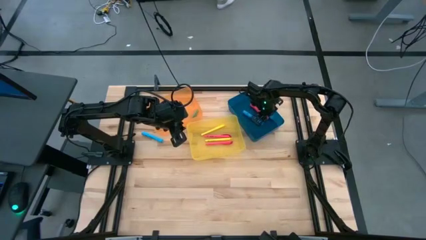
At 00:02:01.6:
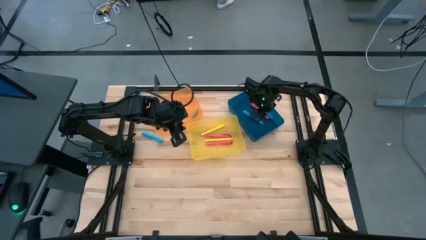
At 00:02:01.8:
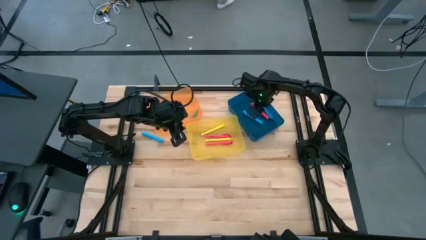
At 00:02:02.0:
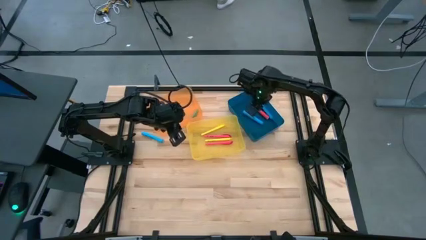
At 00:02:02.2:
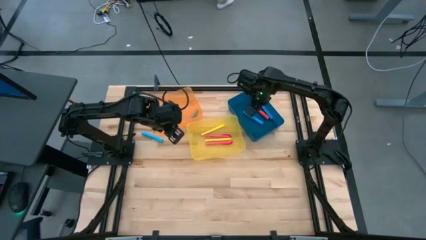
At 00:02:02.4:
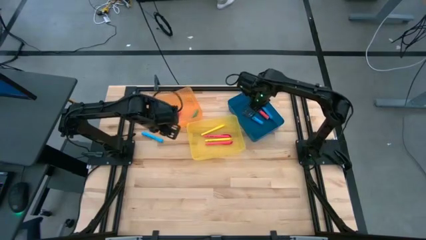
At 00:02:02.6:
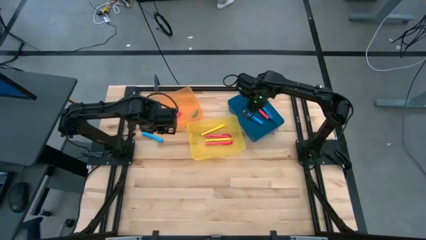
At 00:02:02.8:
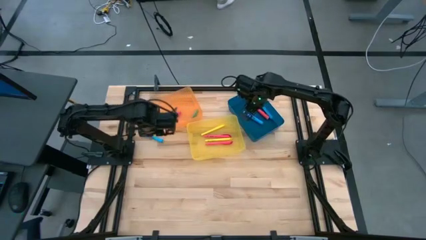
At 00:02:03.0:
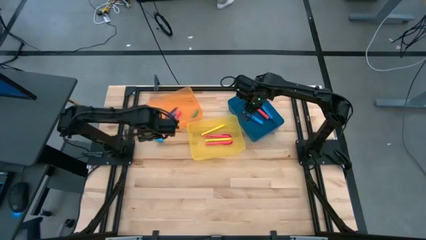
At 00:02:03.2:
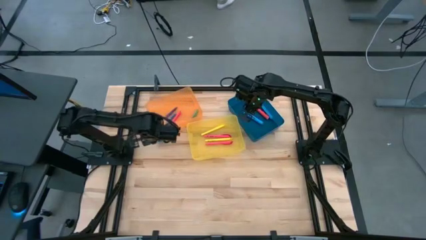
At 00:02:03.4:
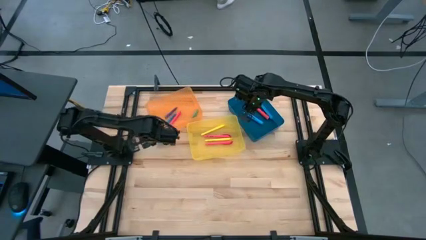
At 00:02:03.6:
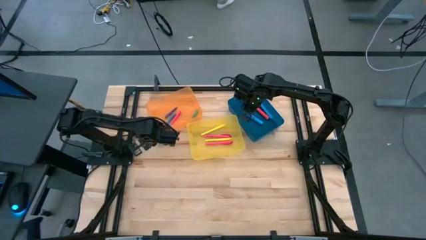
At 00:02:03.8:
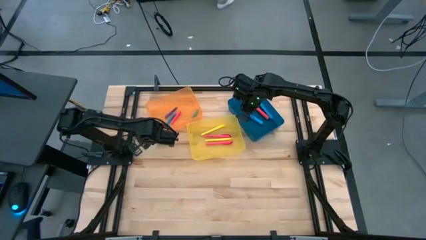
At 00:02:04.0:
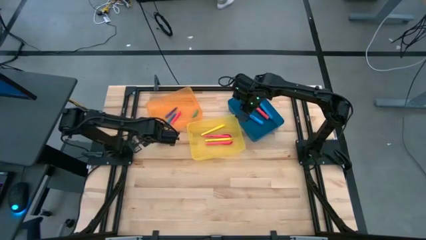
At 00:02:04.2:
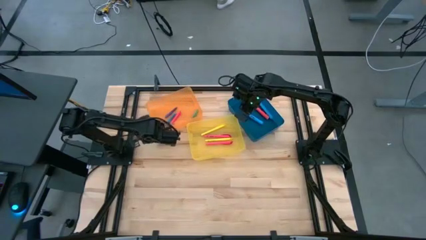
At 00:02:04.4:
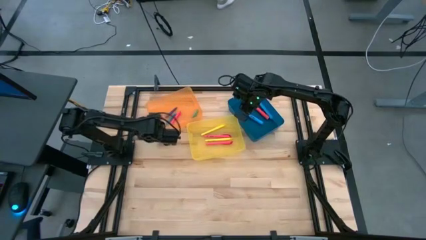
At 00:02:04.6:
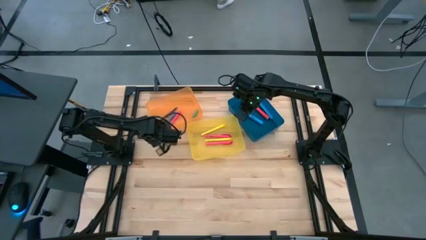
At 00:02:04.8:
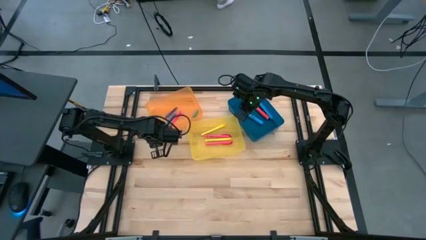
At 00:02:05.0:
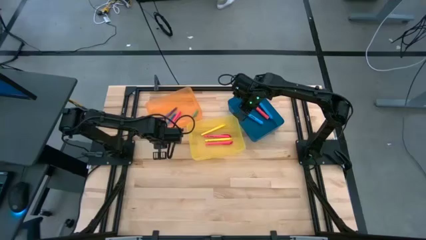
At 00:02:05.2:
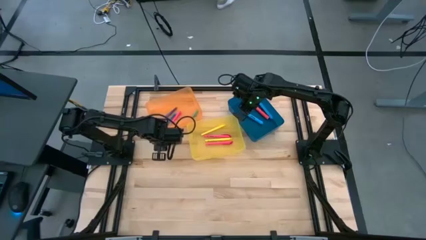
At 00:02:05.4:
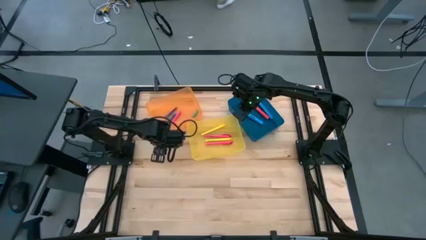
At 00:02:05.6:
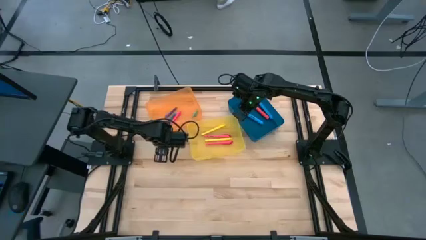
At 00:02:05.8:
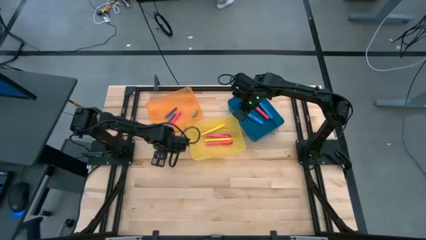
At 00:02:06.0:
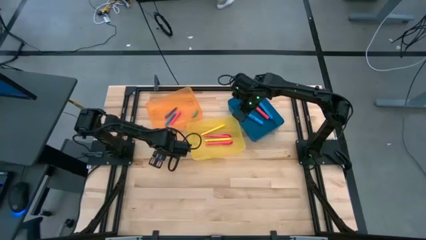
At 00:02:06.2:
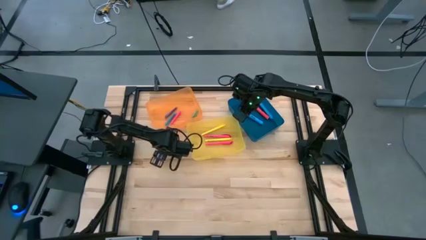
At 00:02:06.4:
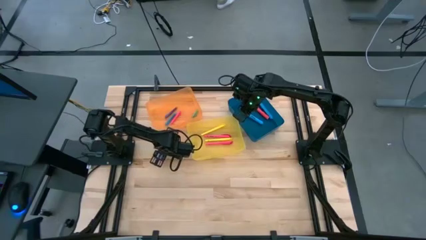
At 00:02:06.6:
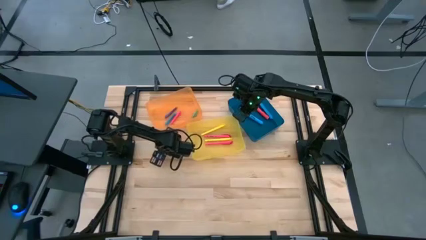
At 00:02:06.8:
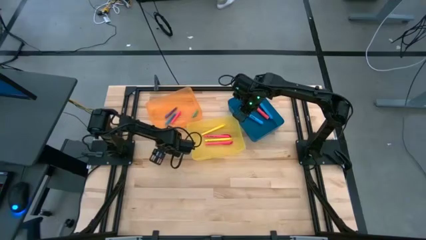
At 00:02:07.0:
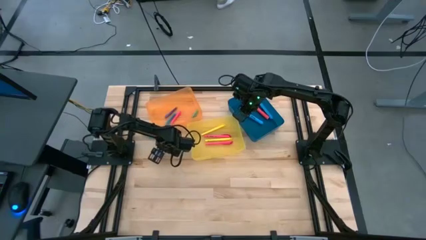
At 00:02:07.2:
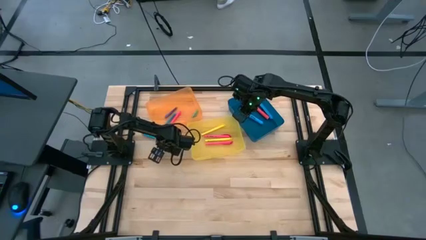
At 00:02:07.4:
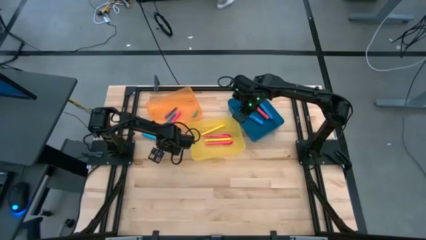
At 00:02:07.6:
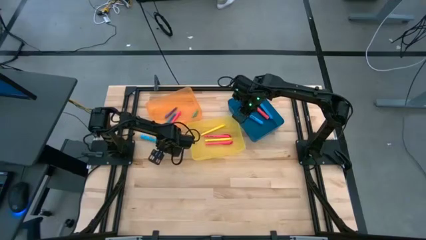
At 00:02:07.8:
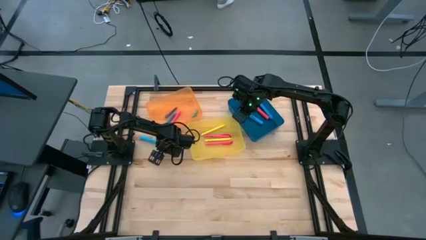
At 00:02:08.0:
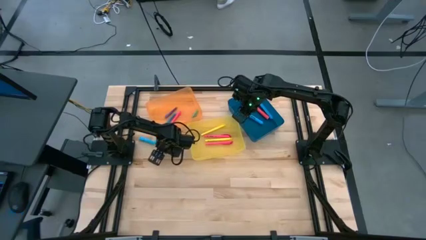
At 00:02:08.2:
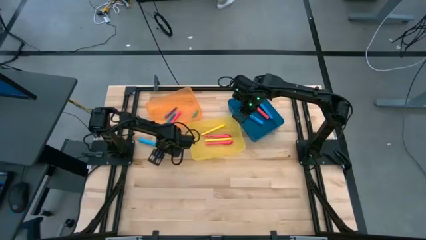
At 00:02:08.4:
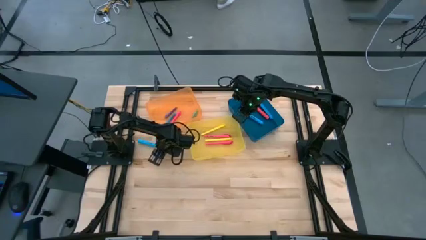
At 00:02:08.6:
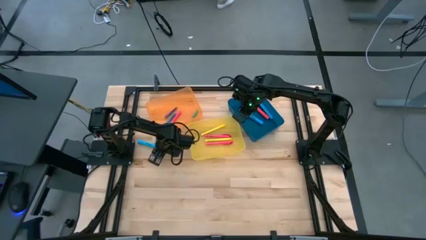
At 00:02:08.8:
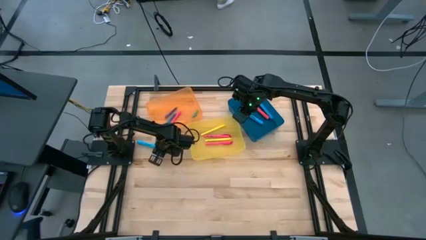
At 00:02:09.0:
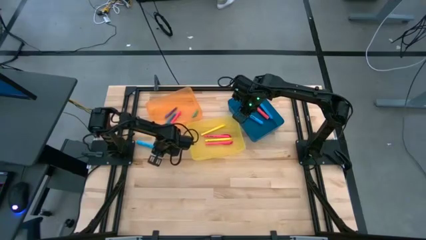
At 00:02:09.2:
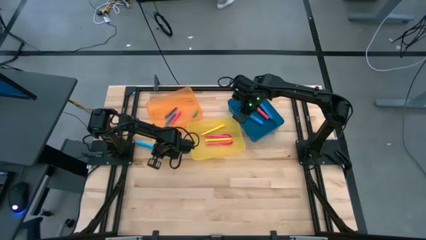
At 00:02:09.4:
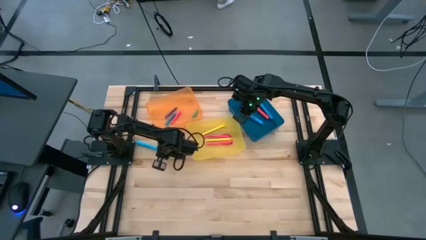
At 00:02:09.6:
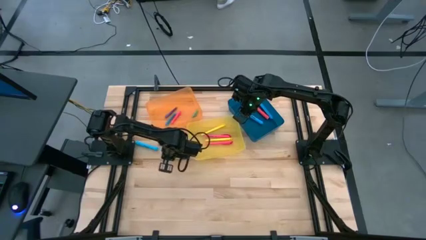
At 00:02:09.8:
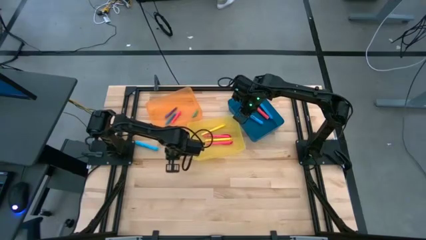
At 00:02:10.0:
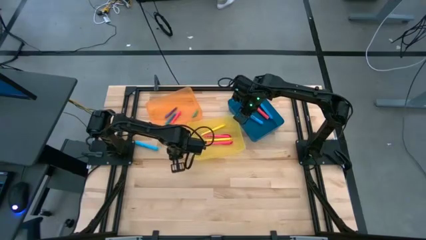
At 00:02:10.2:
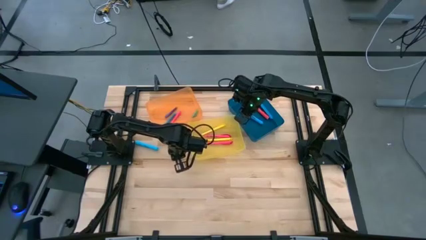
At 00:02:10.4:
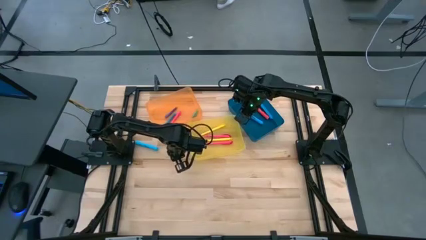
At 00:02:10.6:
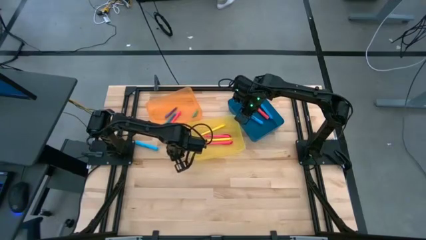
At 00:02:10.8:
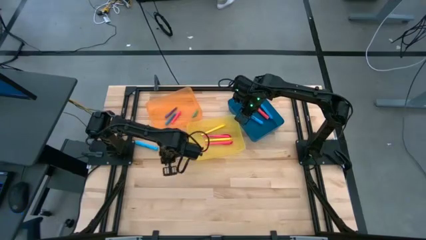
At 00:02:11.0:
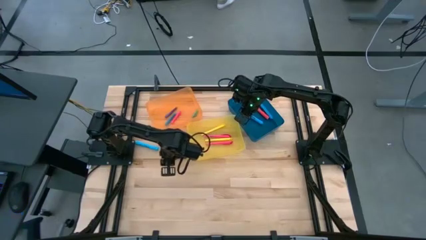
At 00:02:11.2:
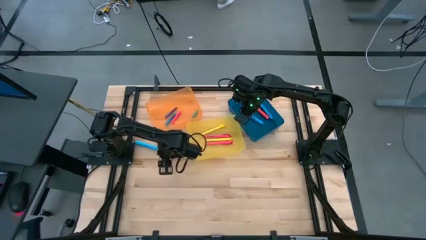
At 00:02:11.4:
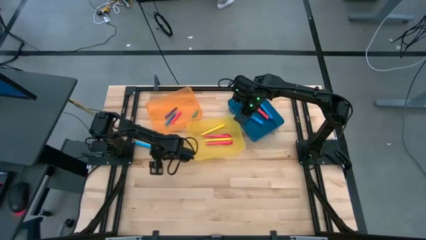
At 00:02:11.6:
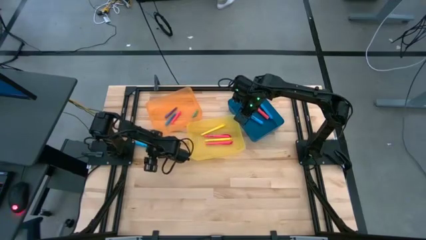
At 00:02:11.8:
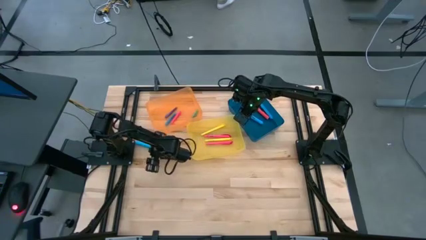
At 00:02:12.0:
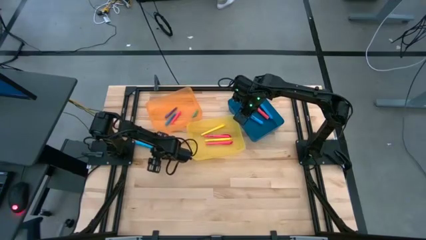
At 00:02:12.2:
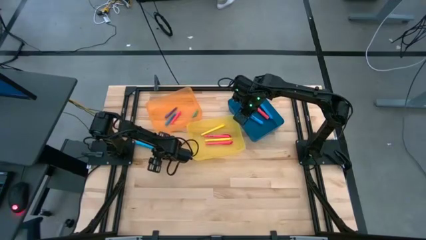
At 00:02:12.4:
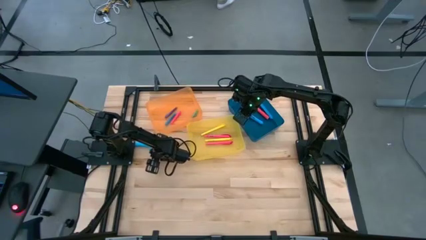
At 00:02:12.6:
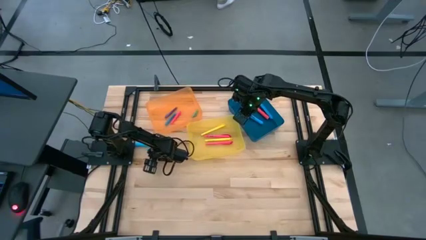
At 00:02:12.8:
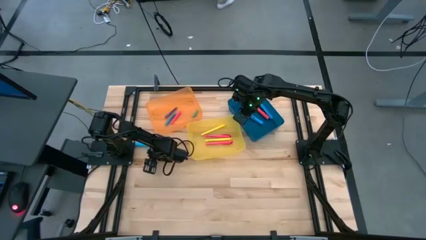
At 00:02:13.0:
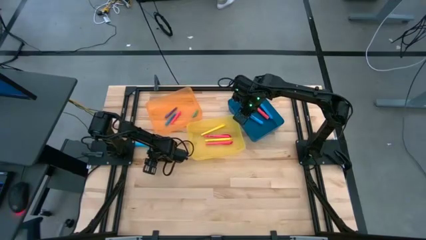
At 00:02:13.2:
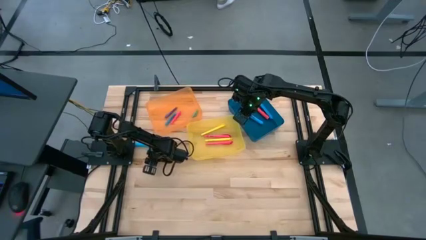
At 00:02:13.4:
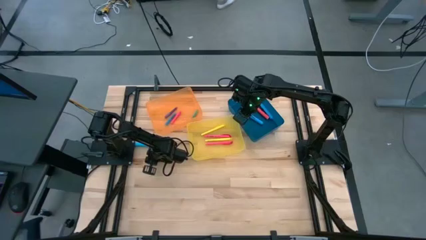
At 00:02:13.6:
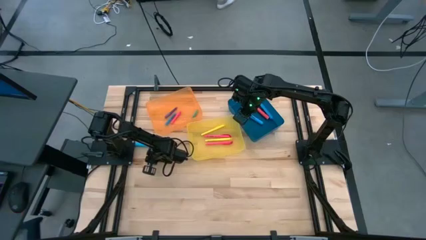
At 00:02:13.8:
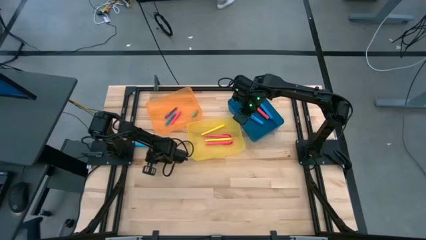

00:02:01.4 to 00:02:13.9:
Task: Pick & Place Markers
Put the blue large highlighter into the blue bin
